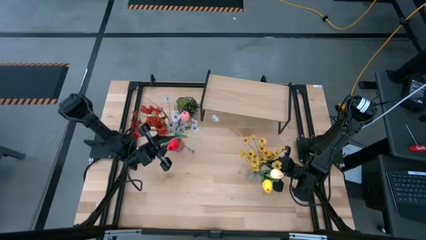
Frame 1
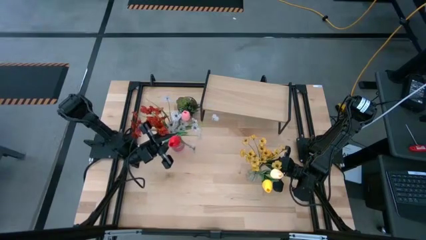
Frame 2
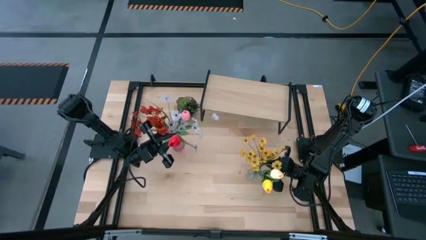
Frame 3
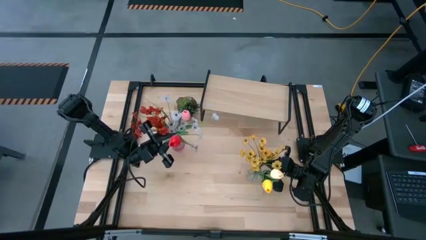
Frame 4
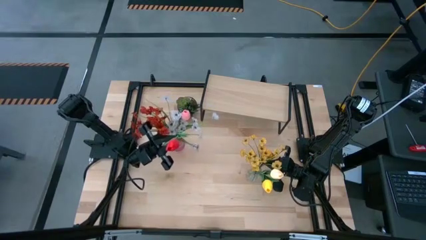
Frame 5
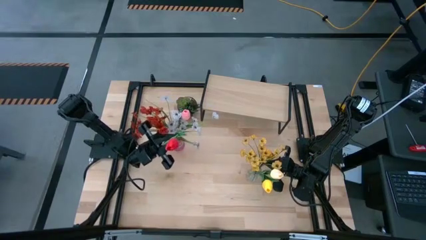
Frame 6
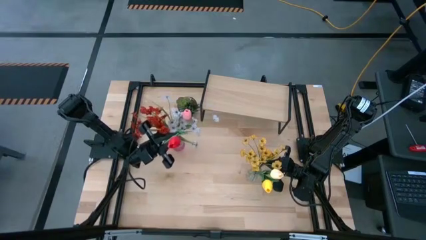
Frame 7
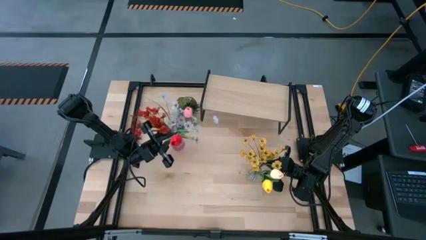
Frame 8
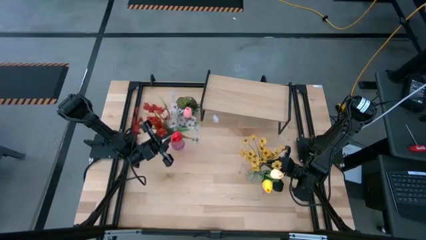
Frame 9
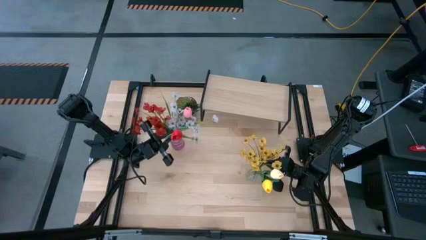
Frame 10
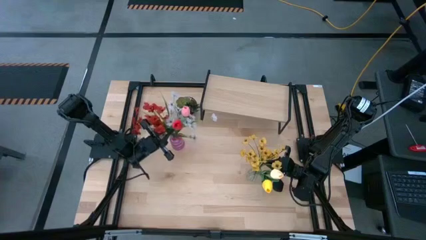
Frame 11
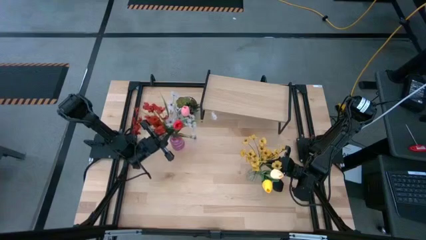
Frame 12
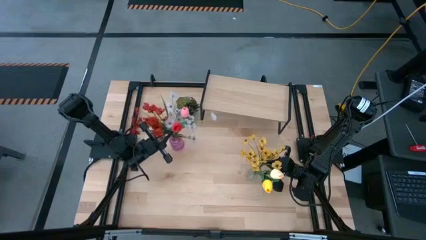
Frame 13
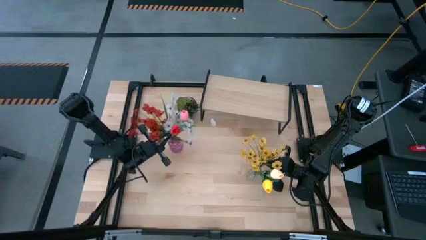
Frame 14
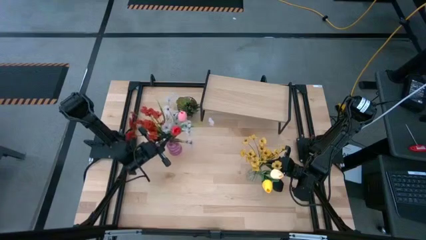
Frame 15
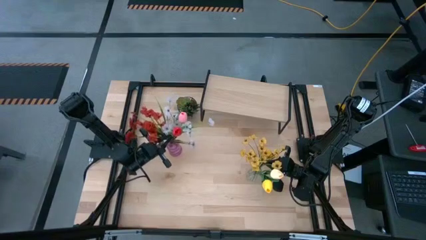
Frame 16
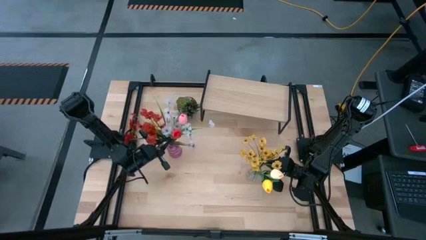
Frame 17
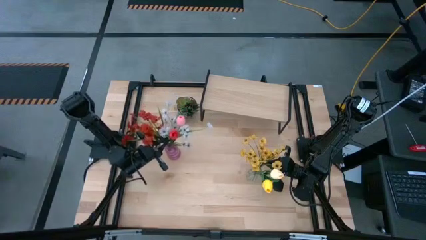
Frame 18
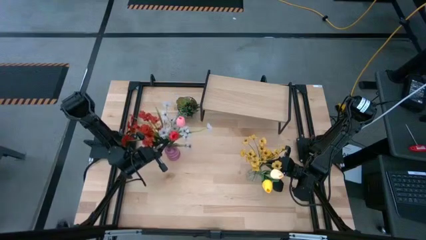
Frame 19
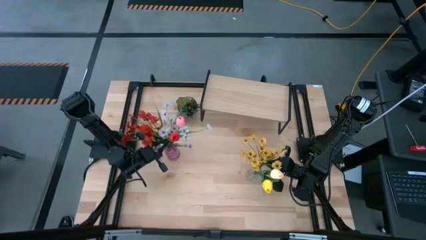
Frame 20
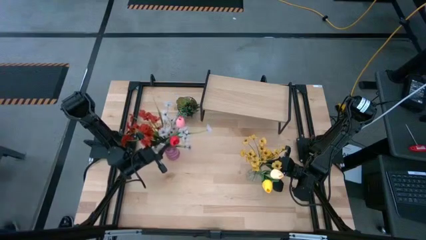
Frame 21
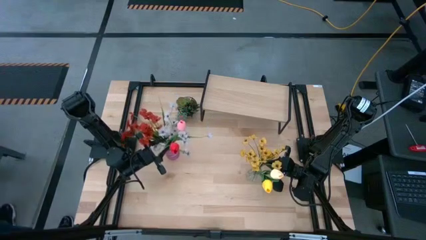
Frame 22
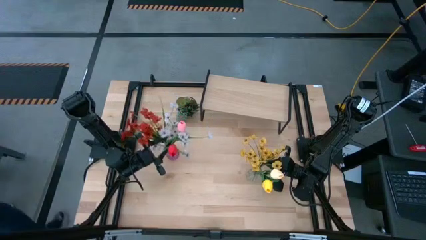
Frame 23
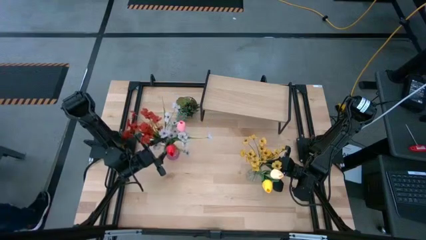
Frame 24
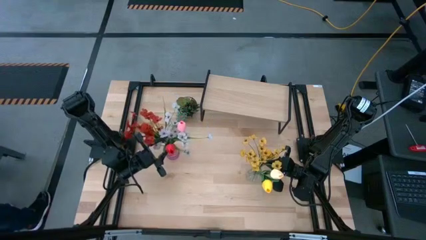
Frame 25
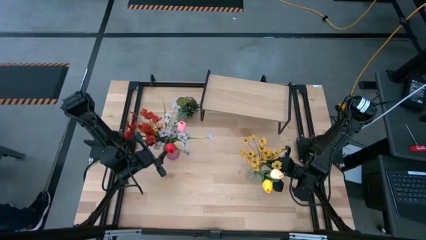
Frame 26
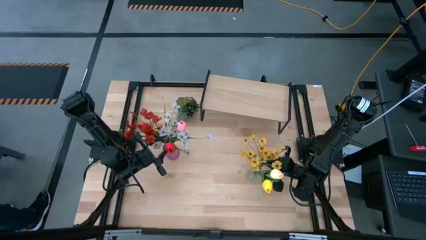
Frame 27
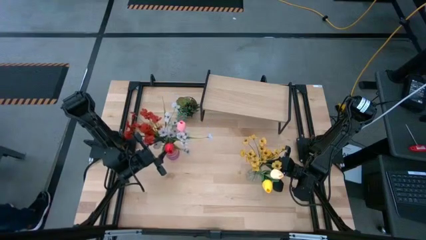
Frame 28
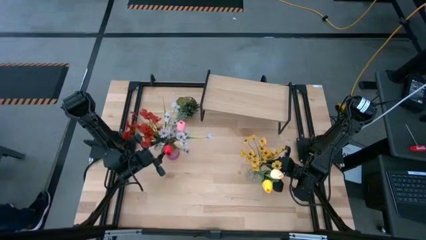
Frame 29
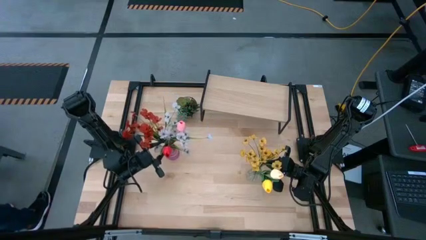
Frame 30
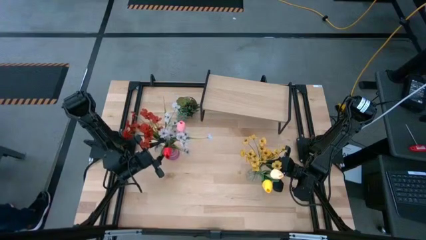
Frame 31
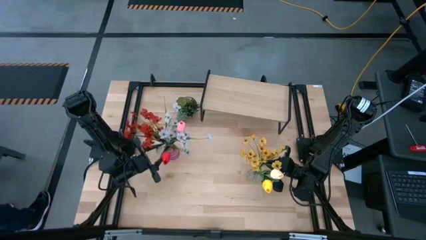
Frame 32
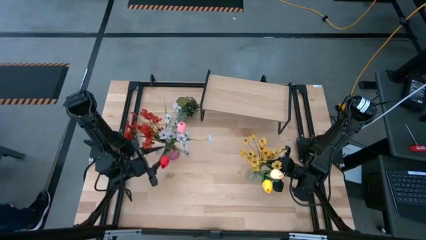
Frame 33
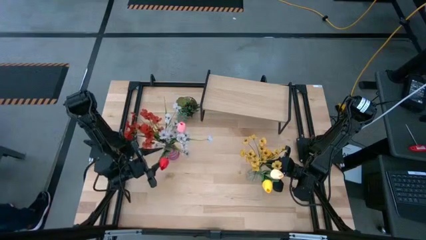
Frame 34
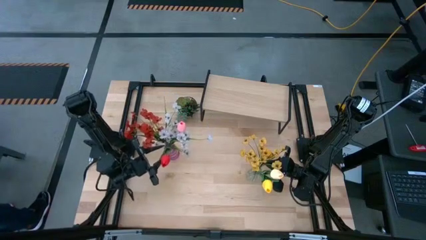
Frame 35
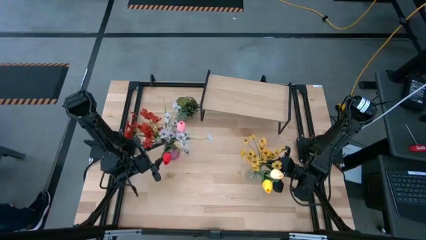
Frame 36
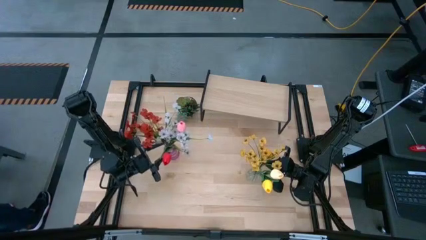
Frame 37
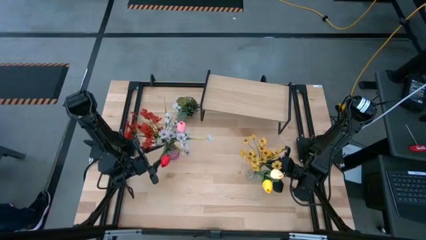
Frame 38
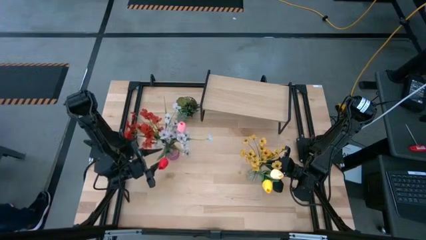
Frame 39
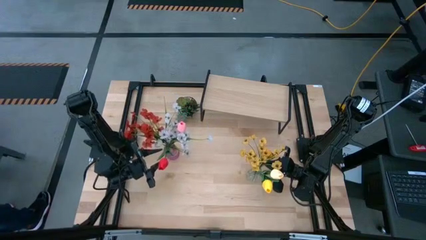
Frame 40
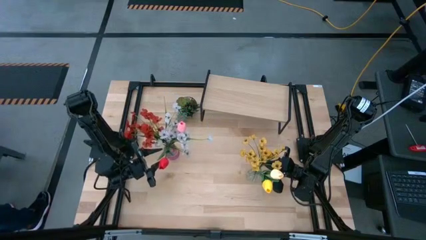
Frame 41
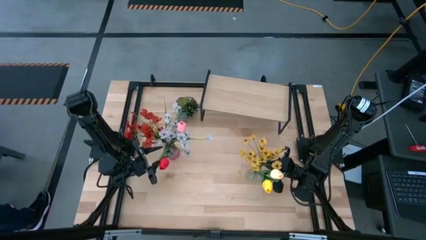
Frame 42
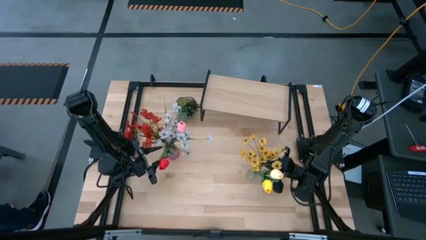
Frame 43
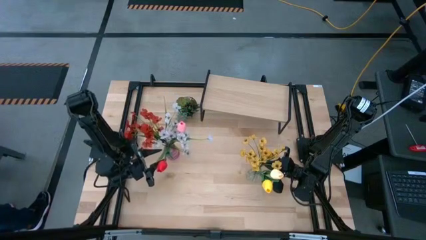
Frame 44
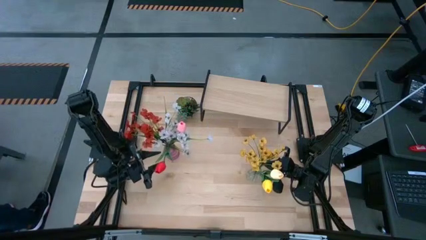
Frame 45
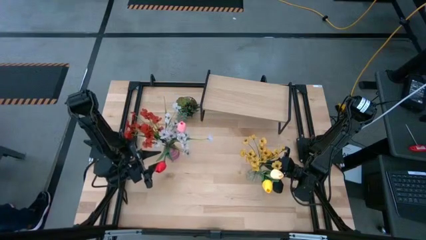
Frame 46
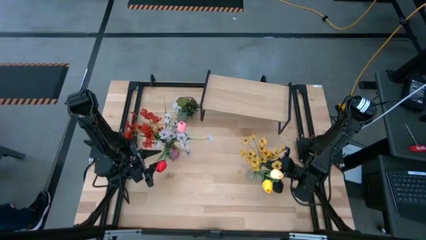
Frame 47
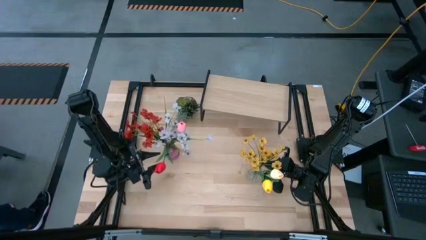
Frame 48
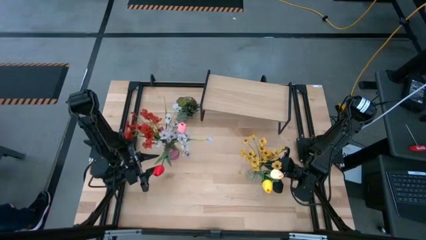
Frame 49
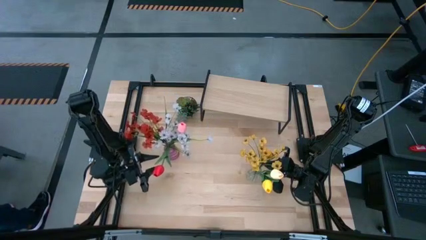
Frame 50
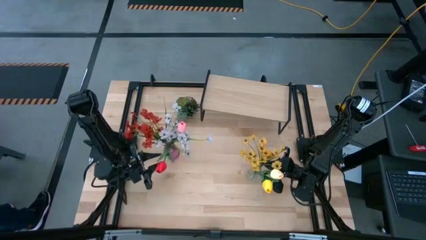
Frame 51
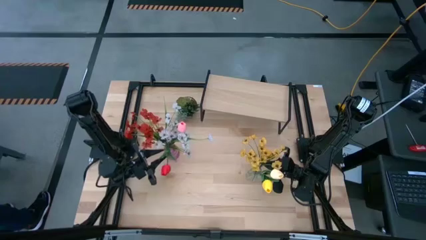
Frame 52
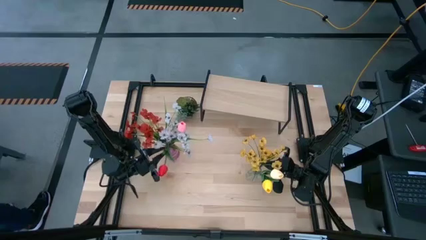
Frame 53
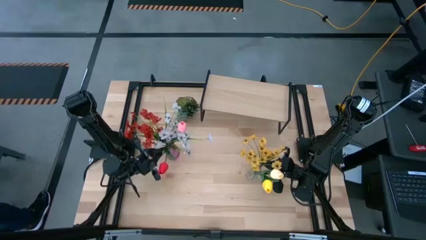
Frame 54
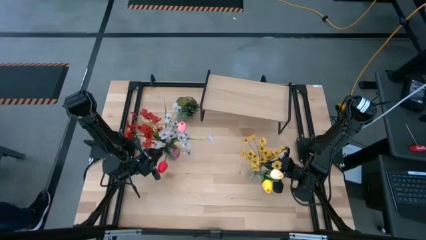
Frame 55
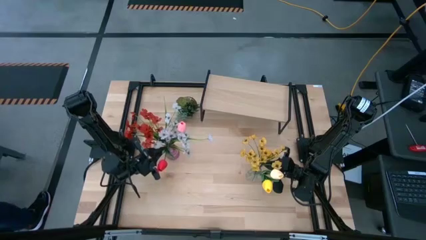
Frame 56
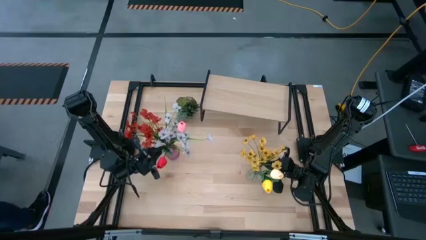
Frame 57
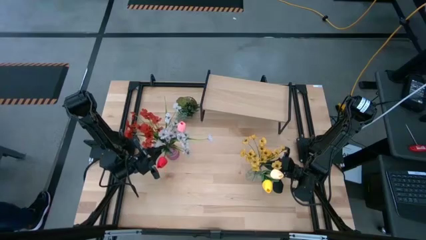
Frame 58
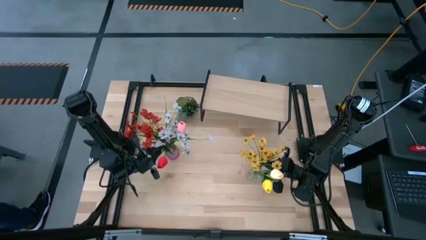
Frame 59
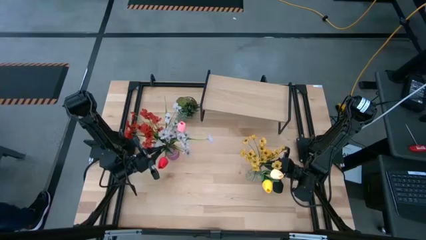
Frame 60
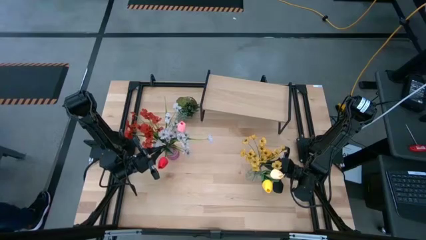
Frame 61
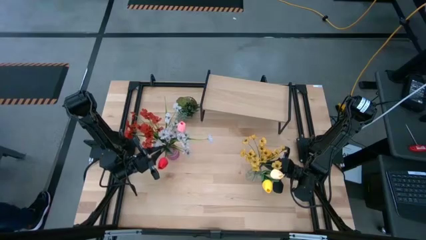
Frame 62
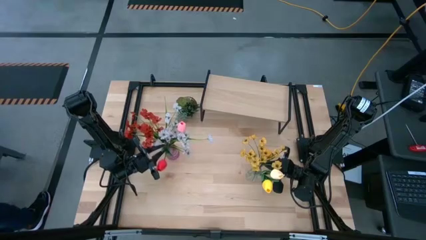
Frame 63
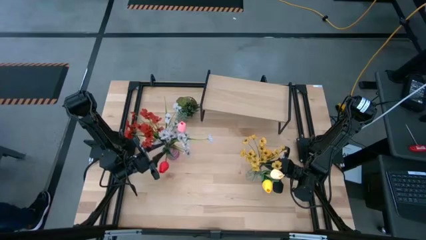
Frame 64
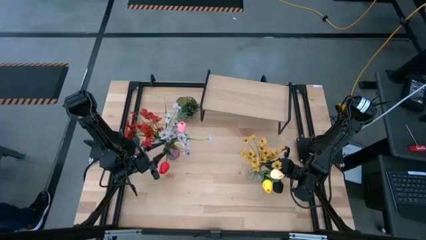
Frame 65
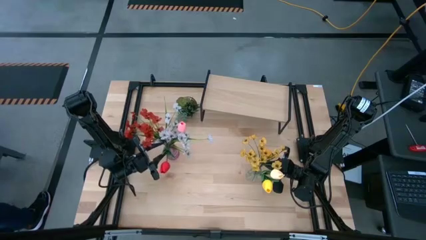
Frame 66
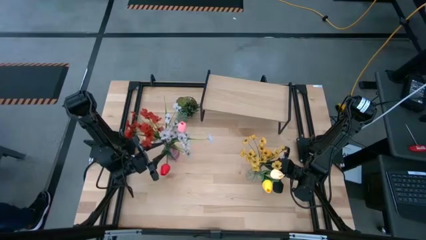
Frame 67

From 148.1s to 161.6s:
Task: Pick and place flowers into a vace then onto a shelf
Put the red flower into the violet vase

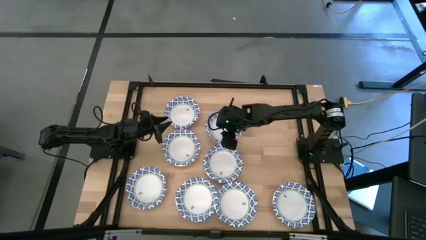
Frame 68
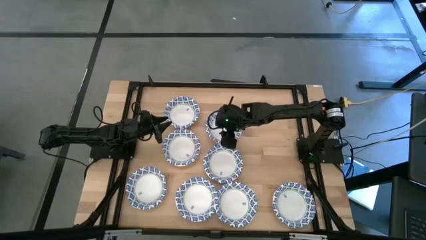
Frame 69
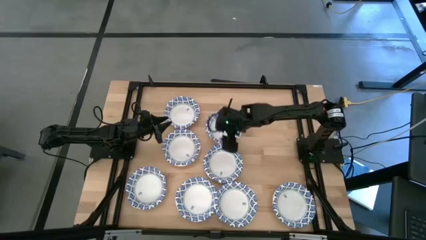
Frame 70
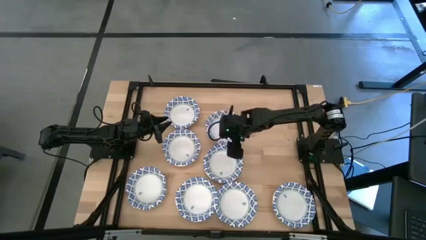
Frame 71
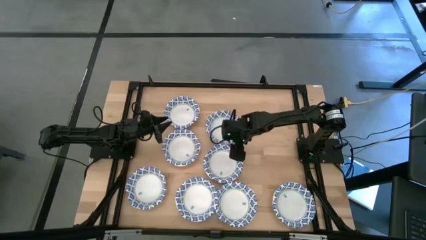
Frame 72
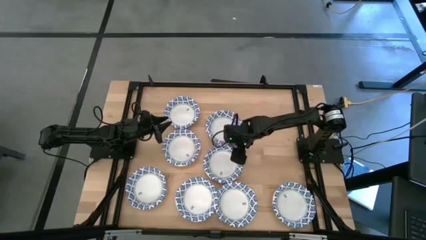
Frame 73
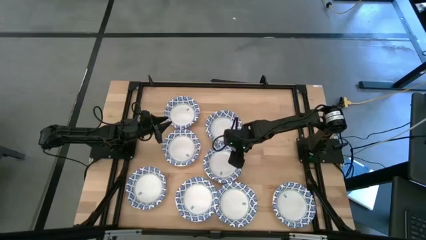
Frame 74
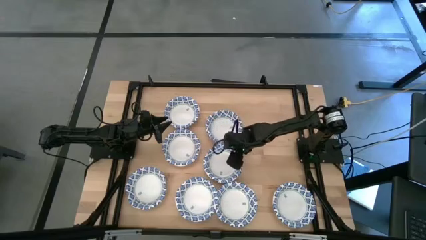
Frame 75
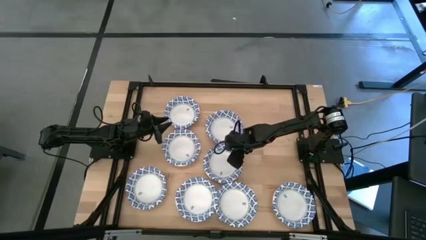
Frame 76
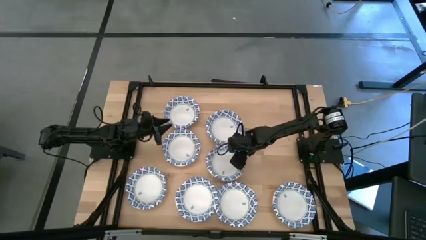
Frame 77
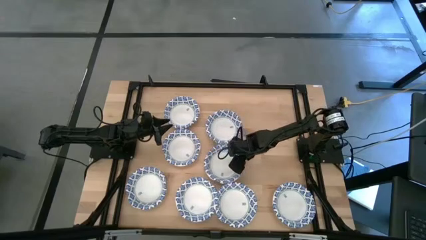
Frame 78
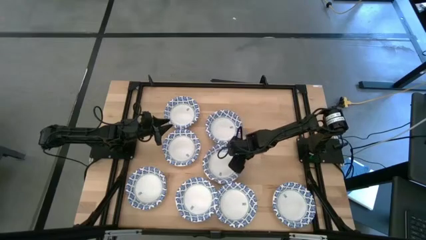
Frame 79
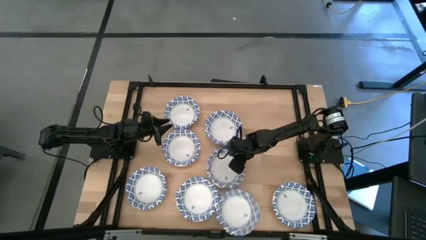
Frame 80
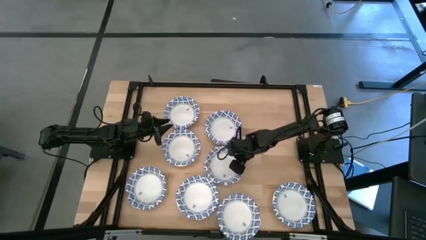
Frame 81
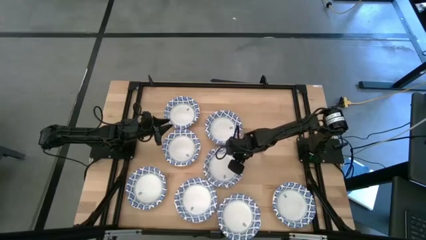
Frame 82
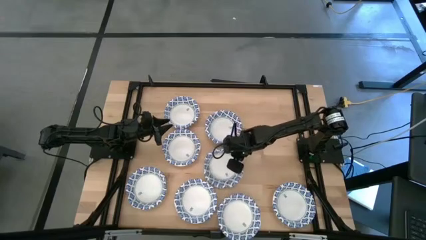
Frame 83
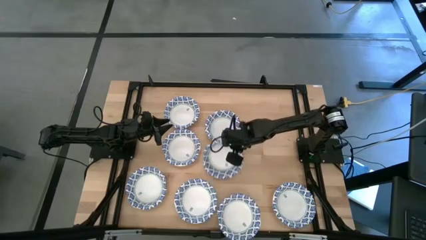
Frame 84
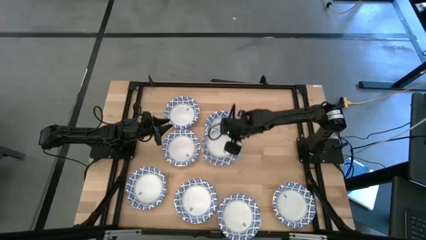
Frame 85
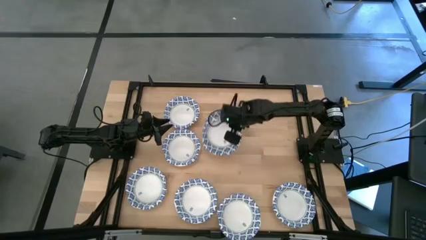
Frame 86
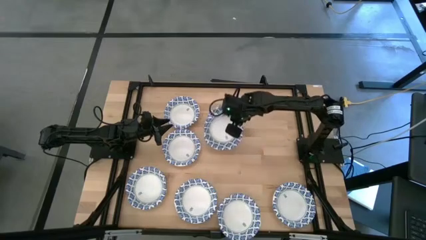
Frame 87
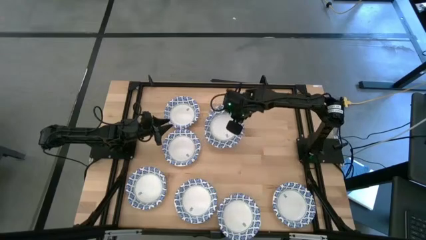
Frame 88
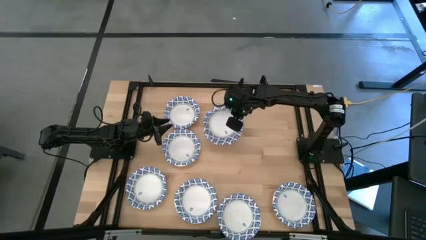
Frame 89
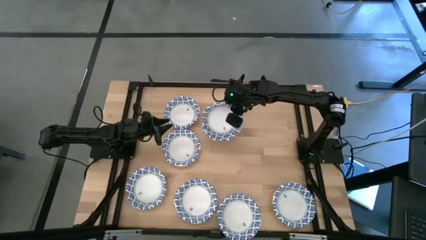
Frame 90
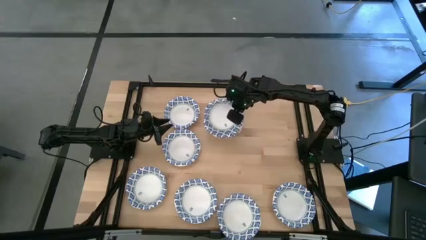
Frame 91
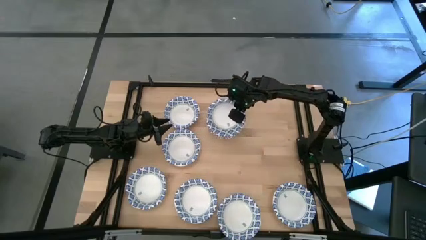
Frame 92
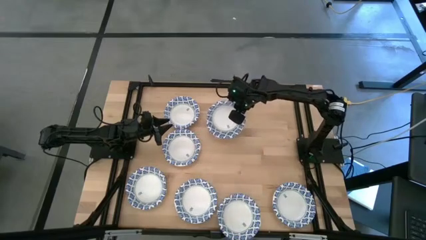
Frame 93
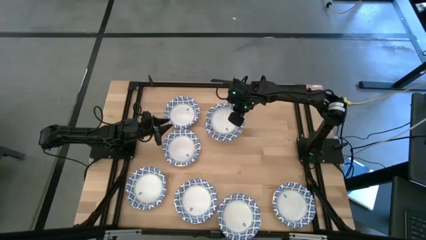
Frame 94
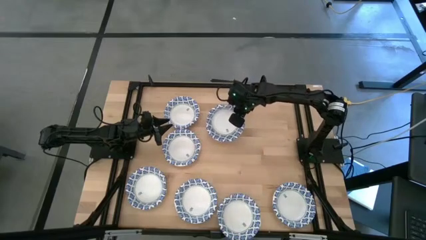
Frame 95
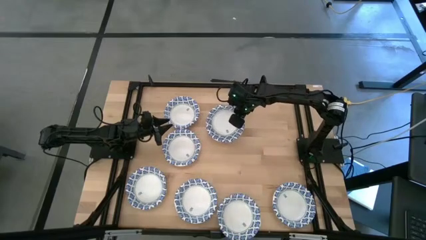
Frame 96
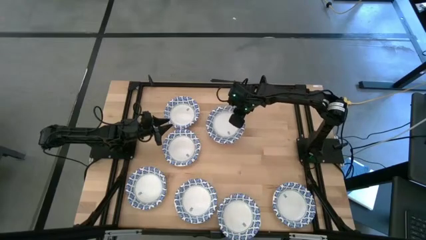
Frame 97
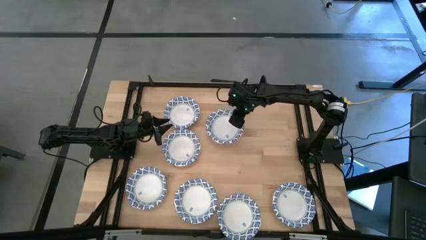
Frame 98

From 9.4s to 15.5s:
Task: Nest bowls inside each other
Stack the blue patterned bowl on top of the other blue patterned bowl
